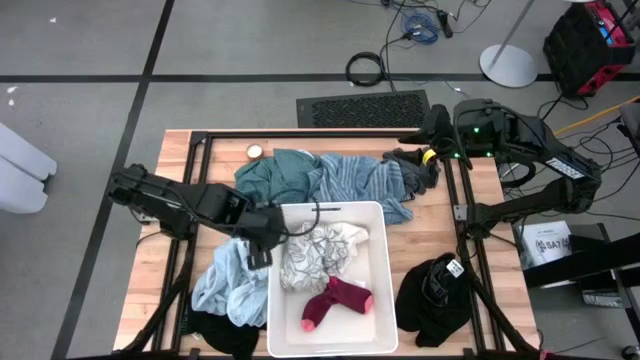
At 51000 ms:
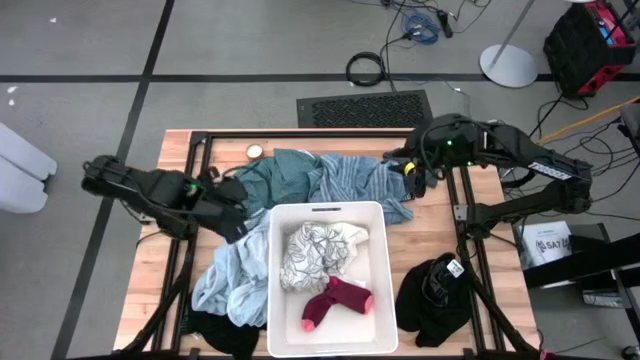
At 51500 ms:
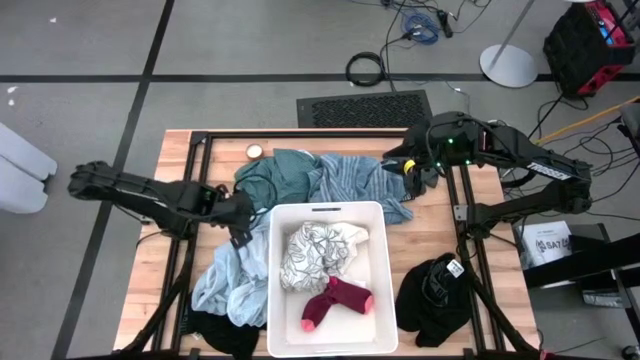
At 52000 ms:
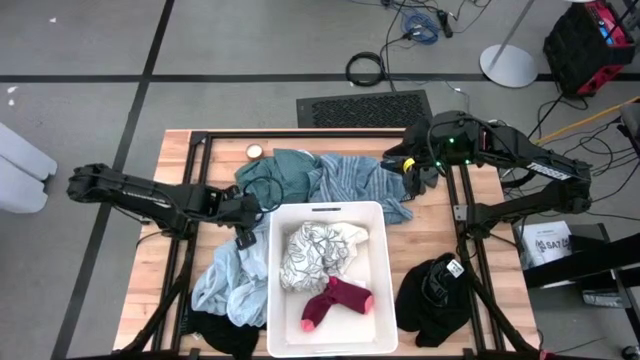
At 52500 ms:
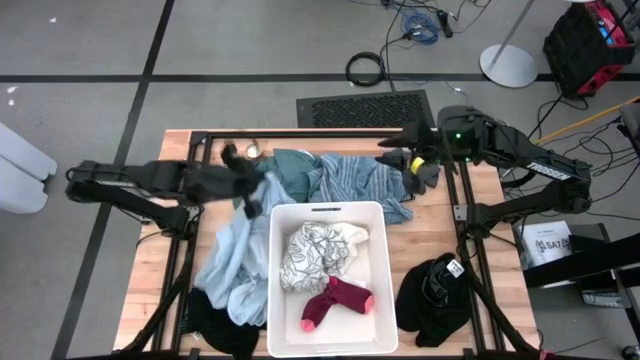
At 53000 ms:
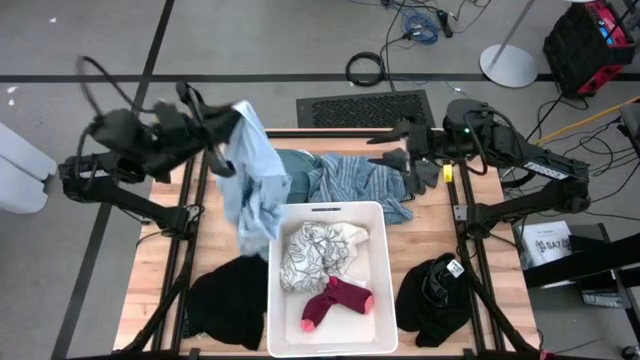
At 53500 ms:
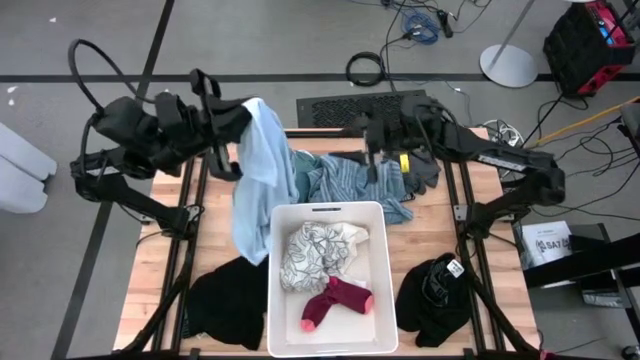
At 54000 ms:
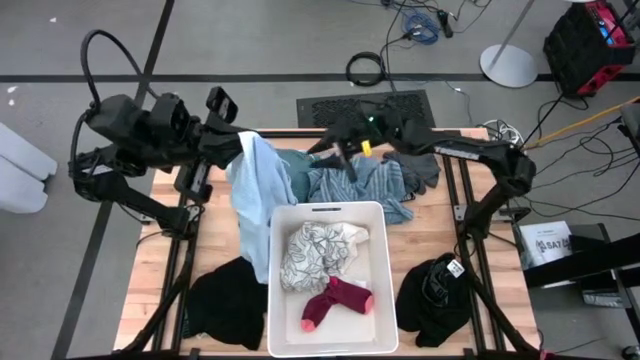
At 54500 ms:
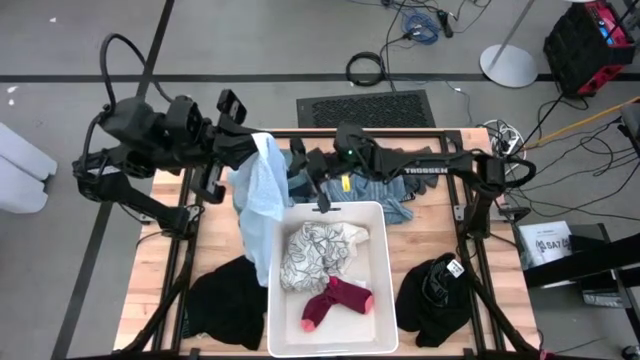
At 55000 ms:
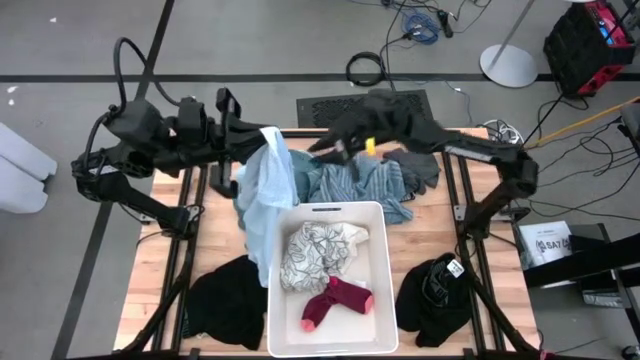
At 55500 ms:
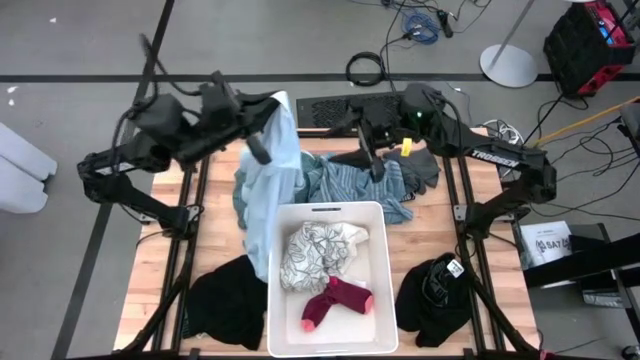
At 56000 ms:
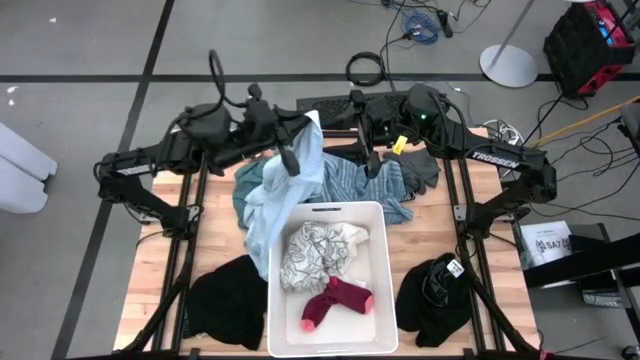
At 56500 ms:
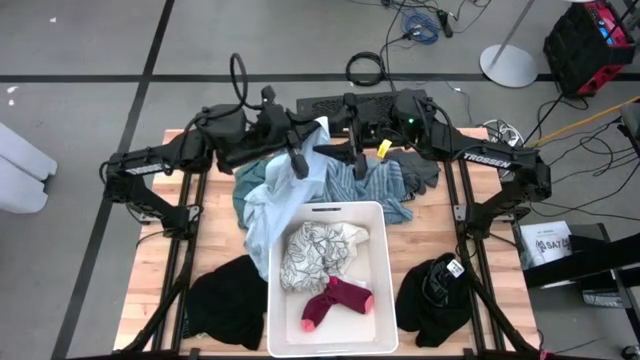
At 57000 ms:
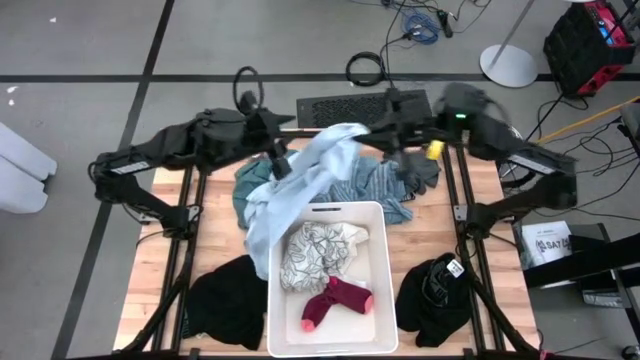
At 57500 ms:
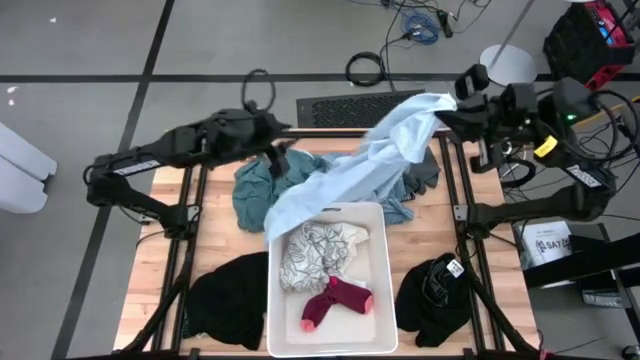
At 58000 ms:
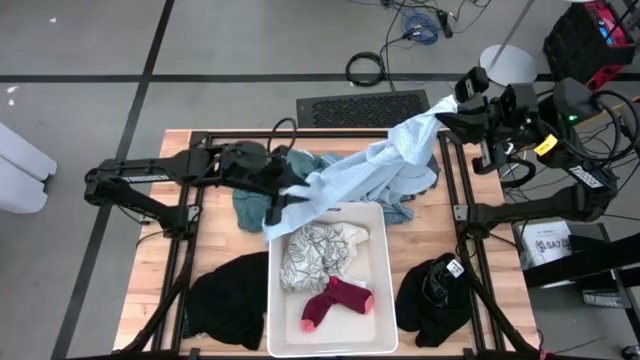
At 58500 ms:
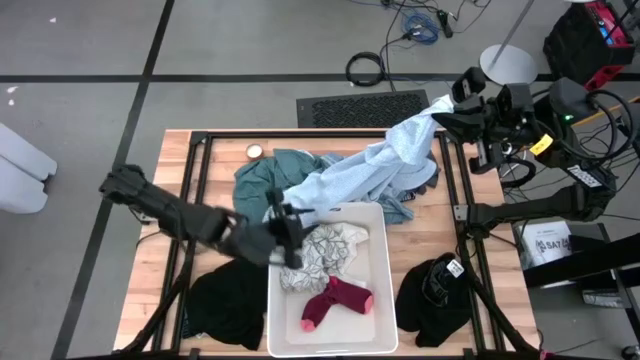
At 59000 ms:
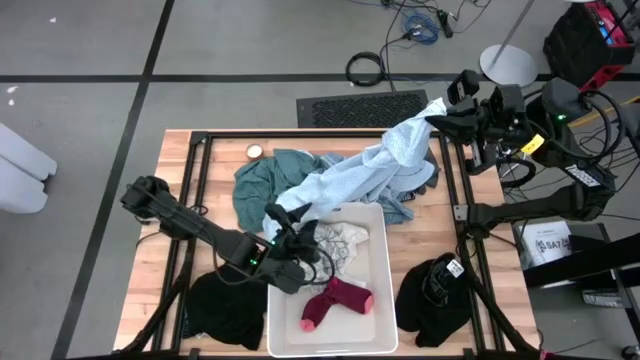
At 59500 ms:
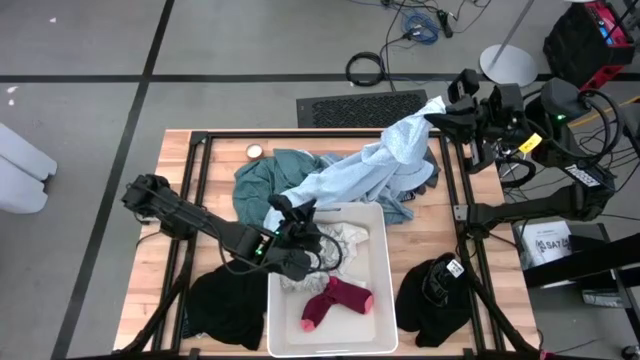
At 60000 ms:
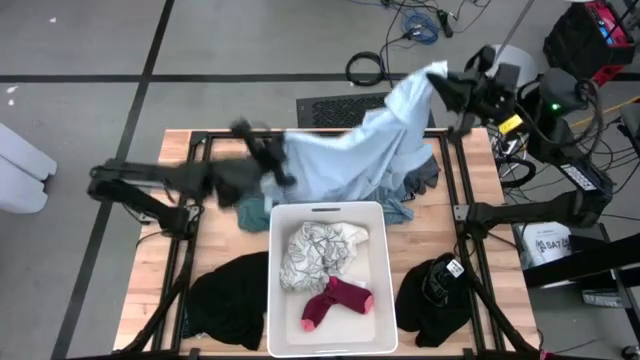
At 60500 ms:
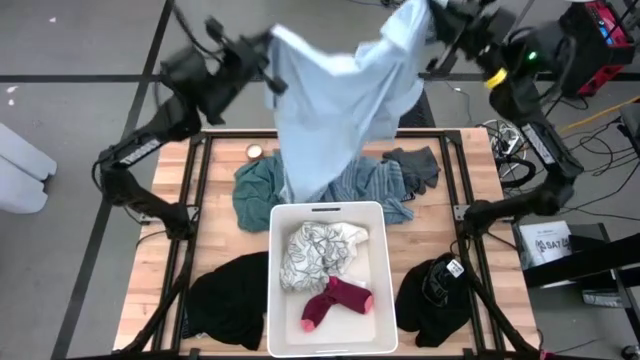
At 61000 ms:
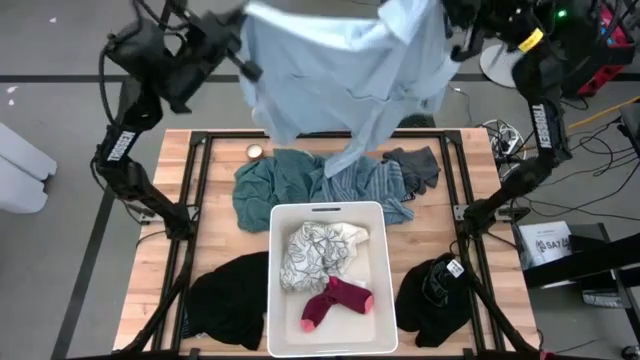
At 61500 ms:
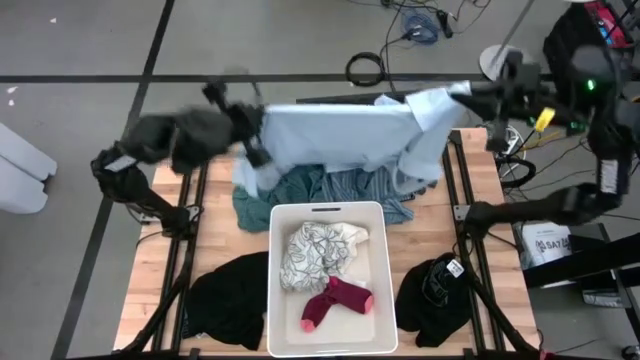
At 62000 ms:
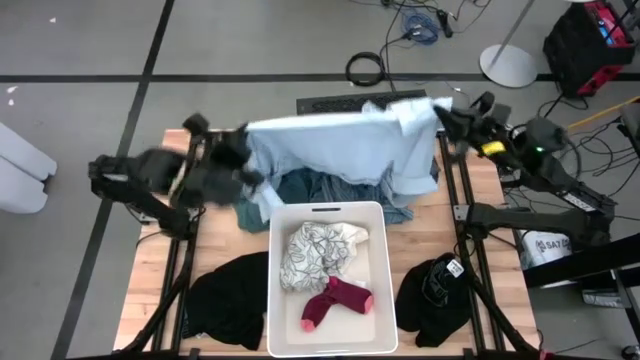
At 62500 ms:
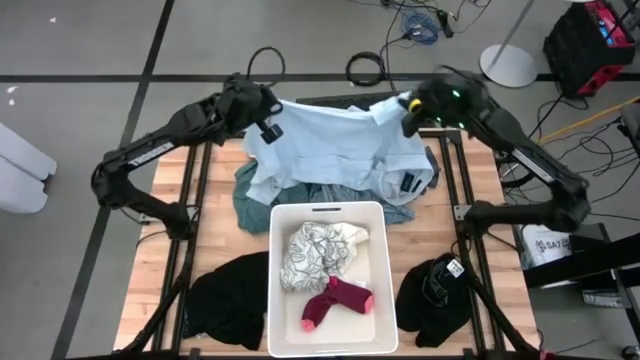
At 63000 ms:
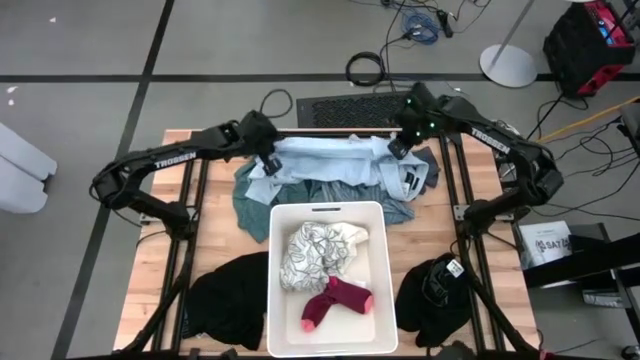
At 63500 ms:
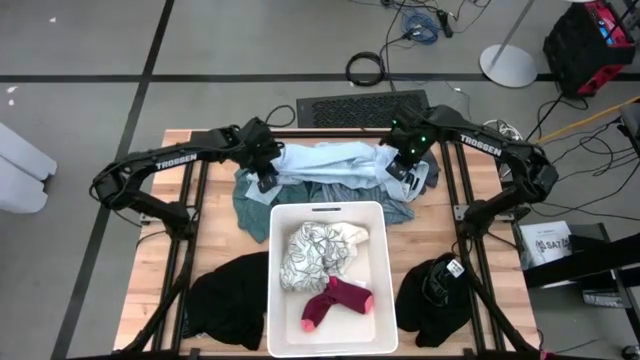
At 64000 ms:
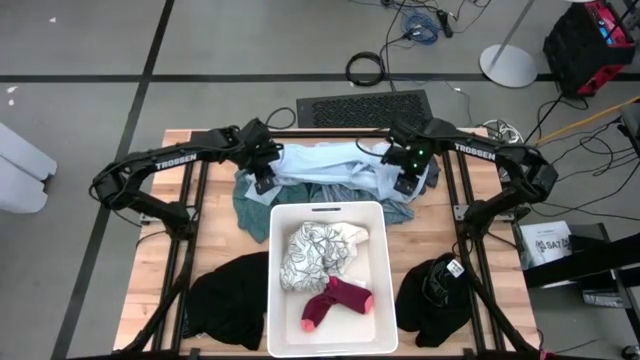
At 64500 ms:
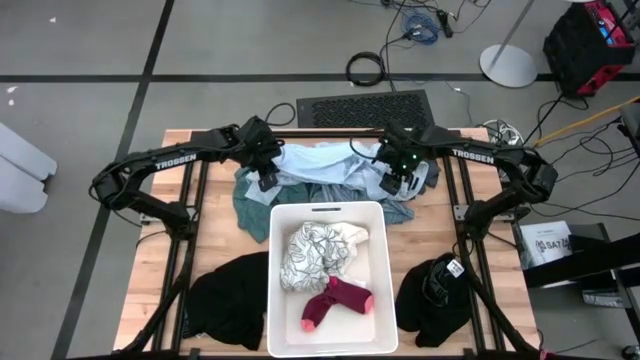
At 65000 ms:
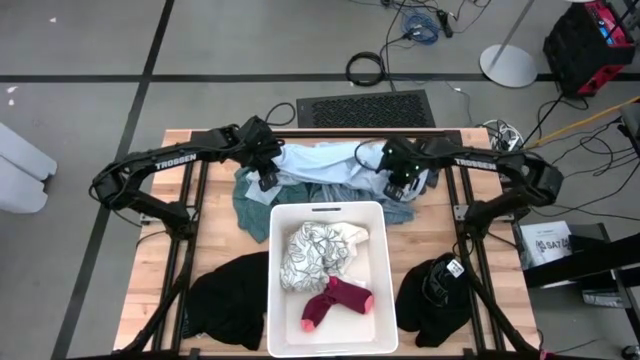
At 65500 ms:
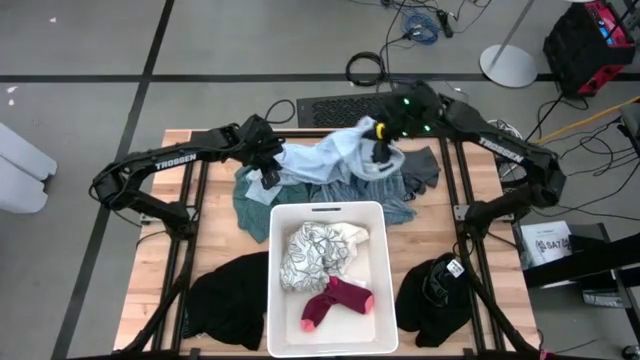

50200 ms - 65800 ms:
Task: Sort clothes
Put the light blue polo shirt into the white laundry bin

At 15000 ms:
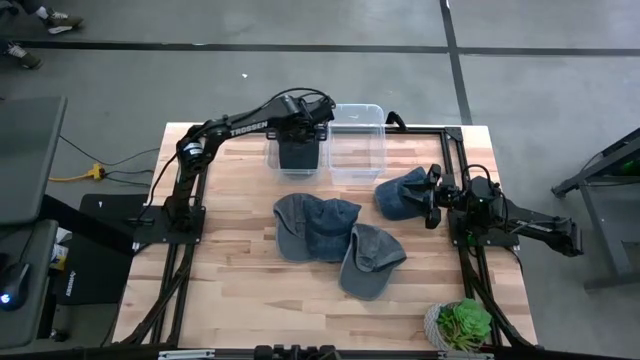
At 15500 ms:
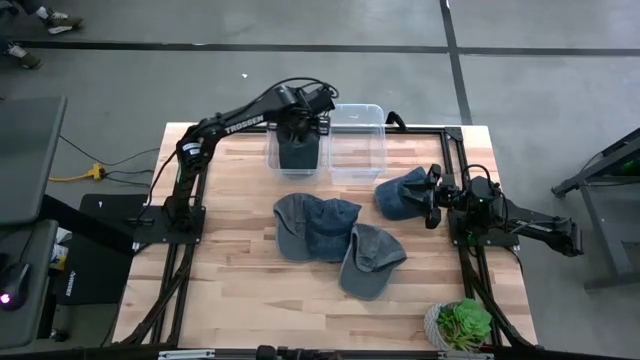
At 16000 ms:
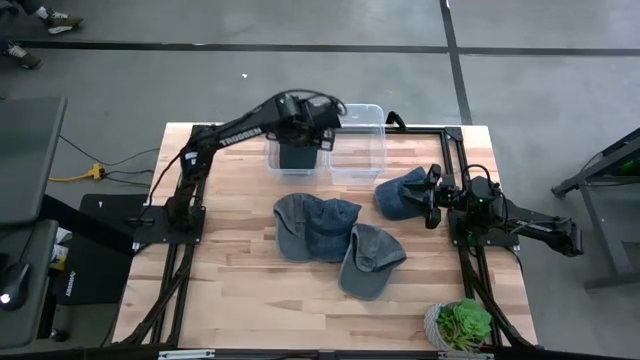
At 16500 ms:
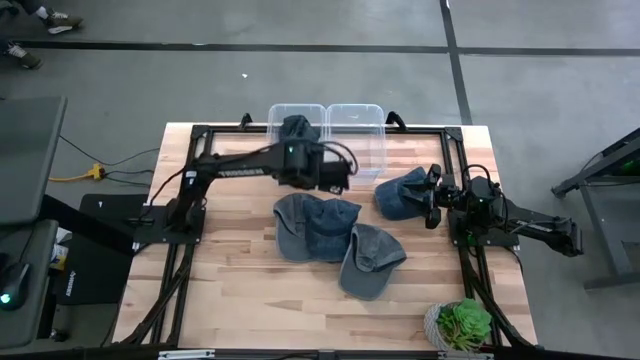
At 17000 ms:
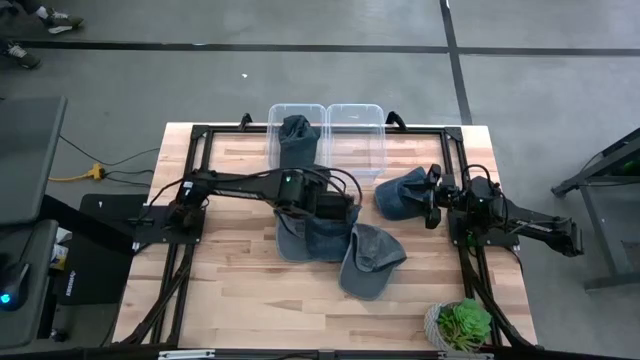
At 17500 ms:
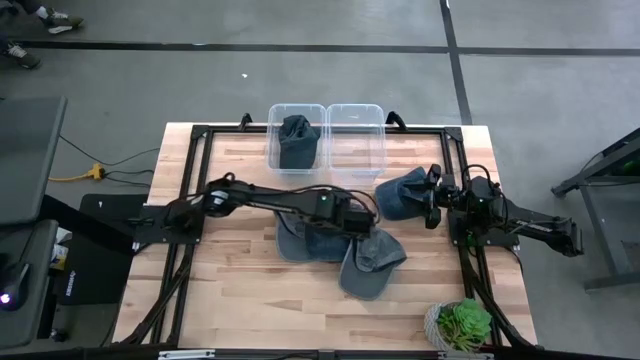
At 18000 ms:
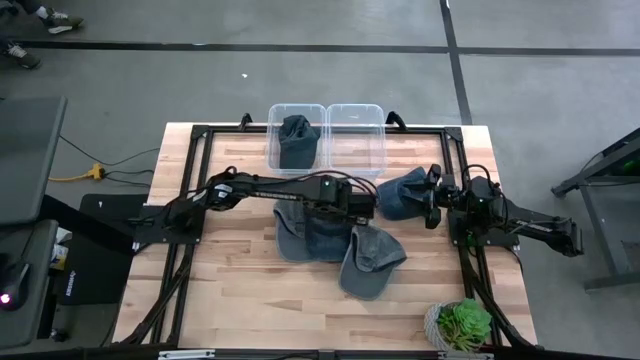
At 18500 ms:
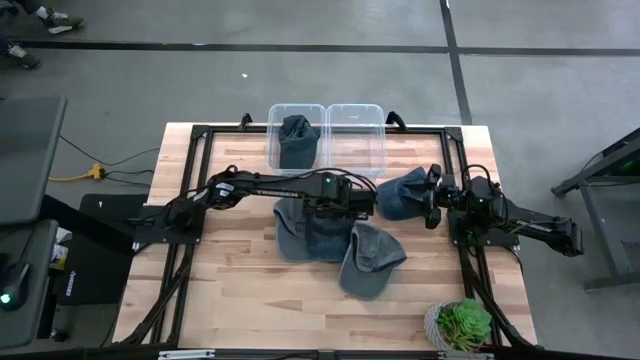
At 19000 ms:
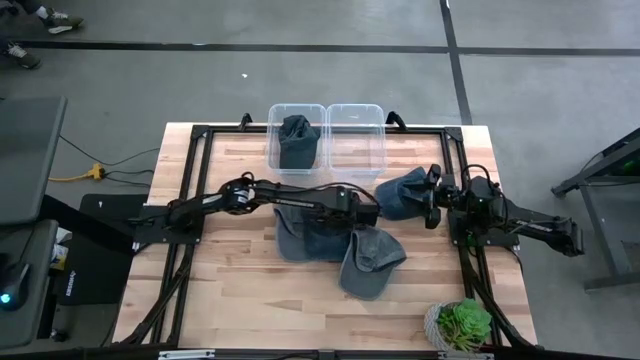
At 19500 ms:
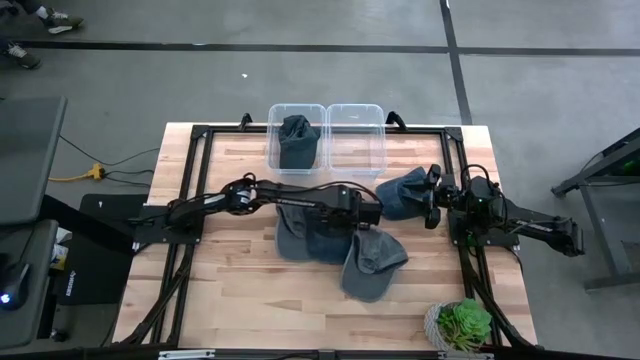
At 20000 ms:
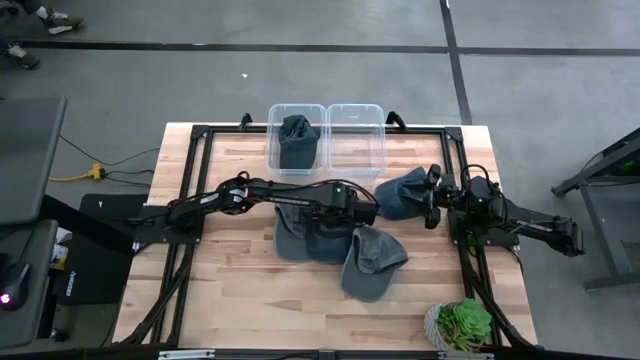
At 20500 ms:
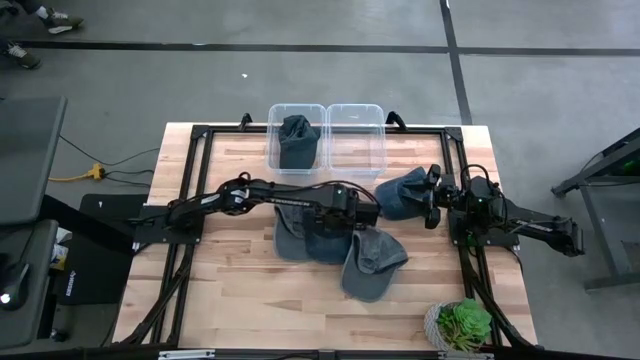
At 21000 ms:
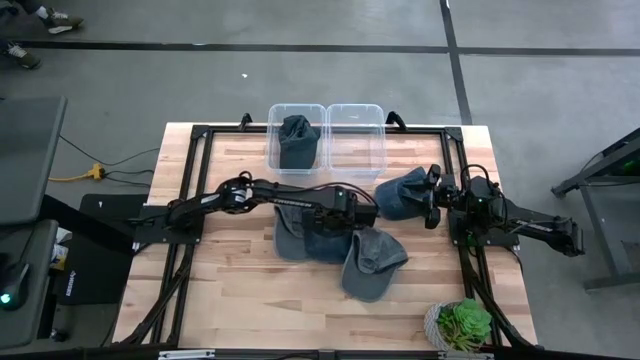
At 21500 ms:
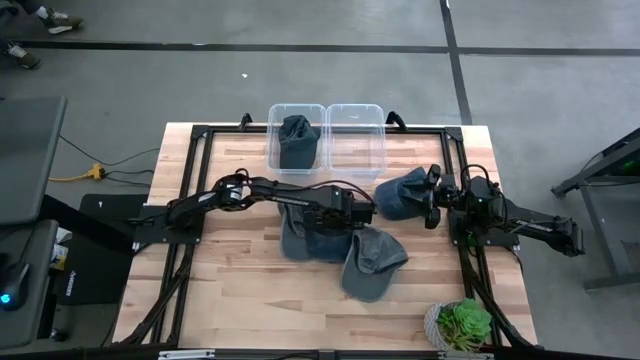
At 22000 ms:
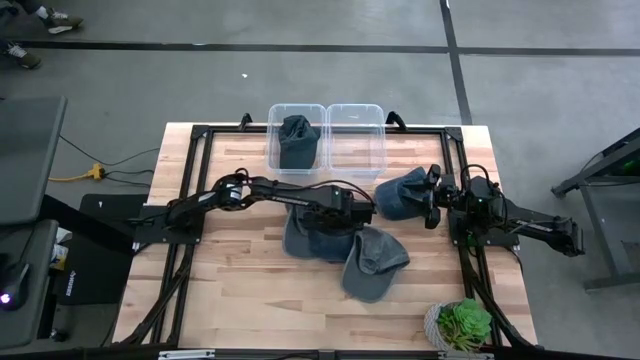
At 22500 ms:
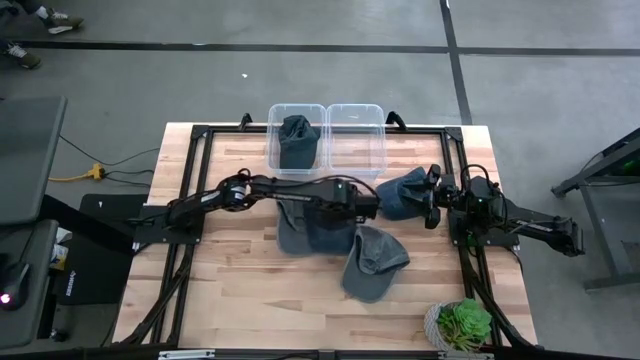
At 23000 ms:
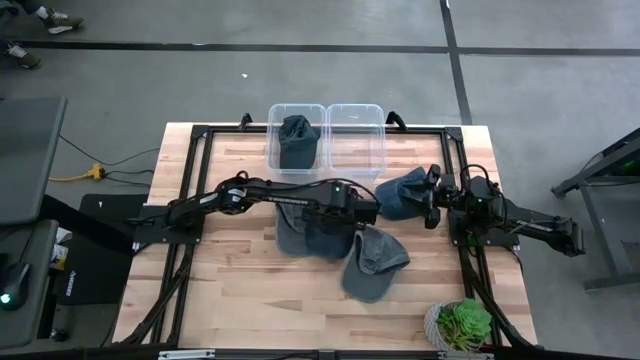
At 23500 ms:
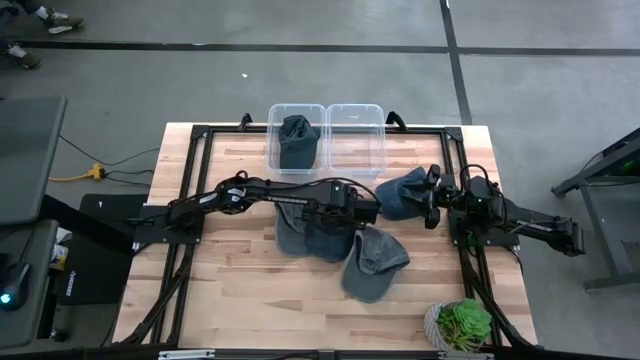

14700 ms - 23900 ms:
Task: Pick & Place hat
Put the left blue cap into the left transparent bin
